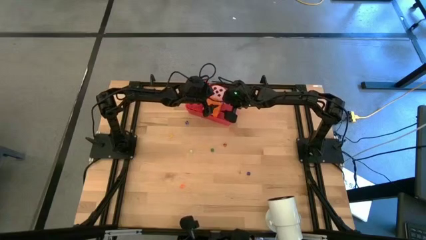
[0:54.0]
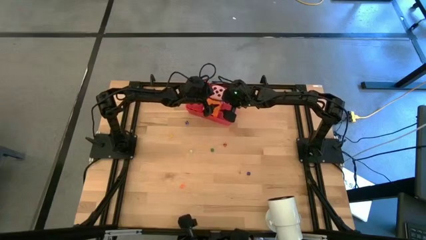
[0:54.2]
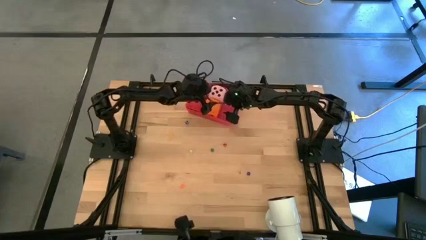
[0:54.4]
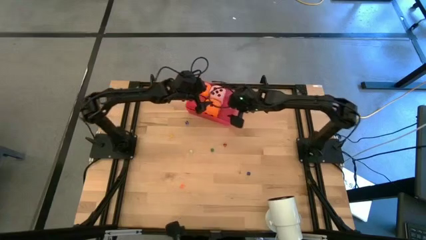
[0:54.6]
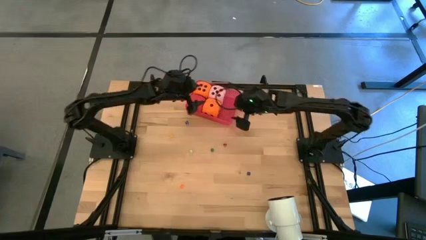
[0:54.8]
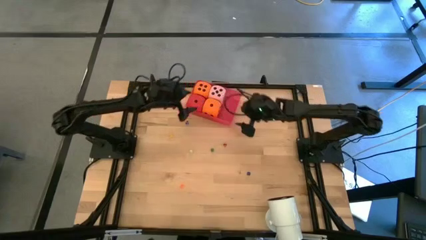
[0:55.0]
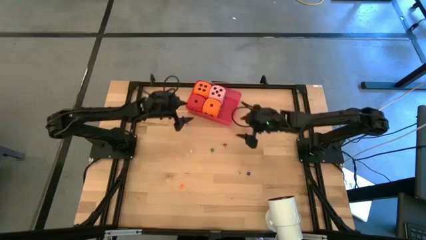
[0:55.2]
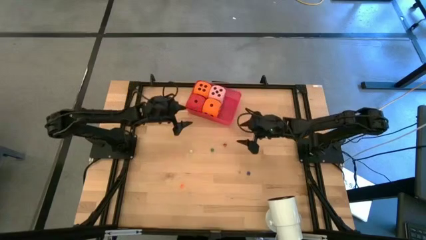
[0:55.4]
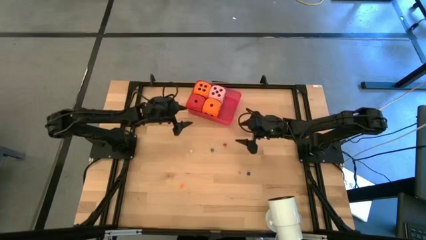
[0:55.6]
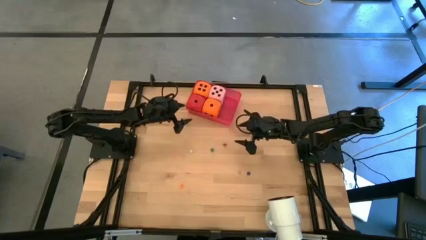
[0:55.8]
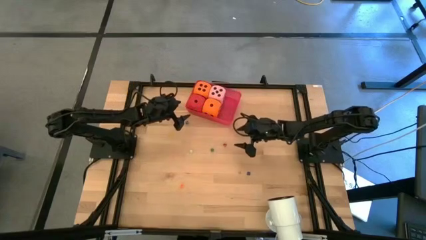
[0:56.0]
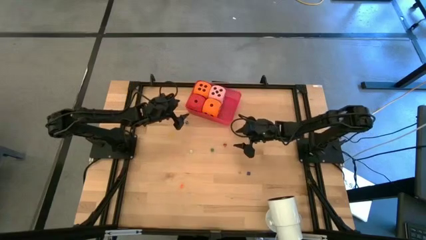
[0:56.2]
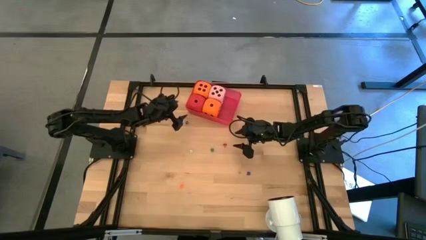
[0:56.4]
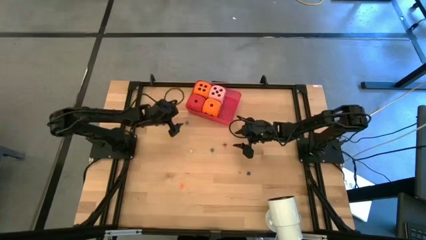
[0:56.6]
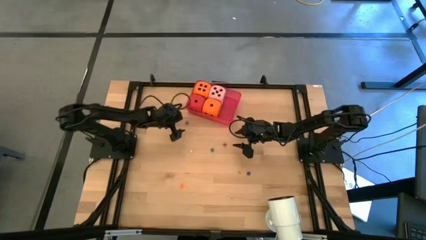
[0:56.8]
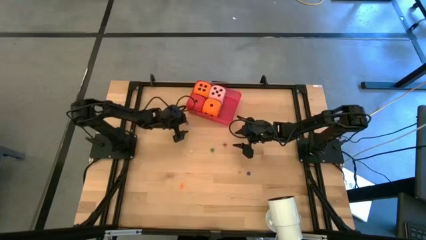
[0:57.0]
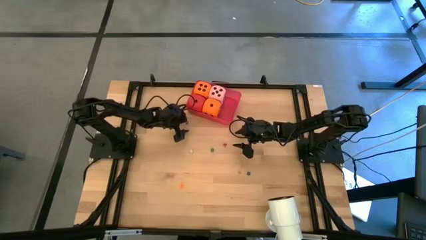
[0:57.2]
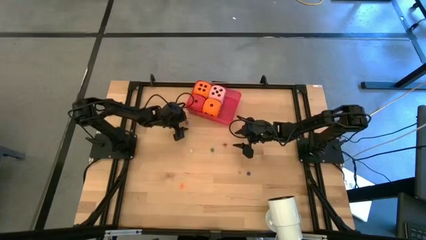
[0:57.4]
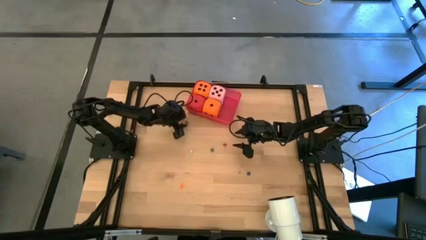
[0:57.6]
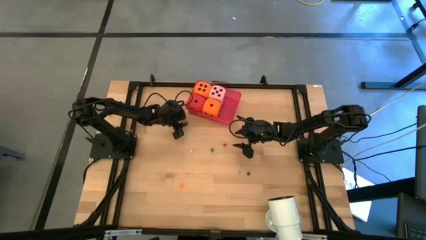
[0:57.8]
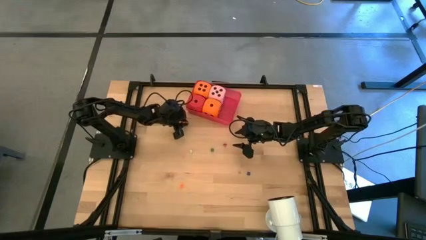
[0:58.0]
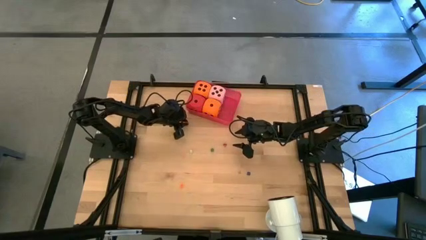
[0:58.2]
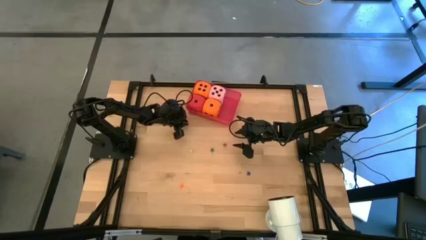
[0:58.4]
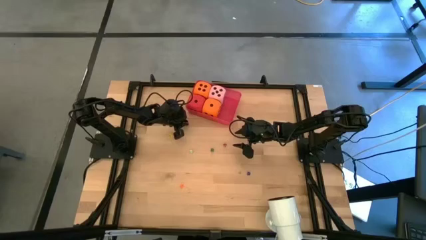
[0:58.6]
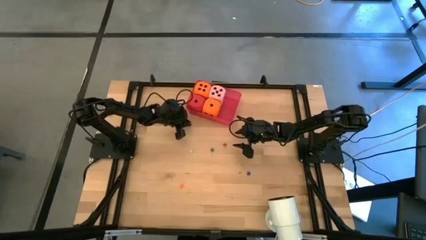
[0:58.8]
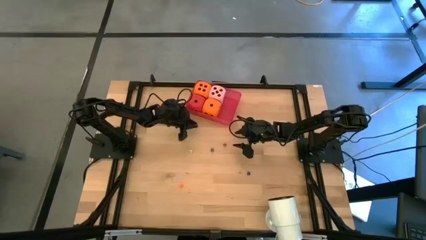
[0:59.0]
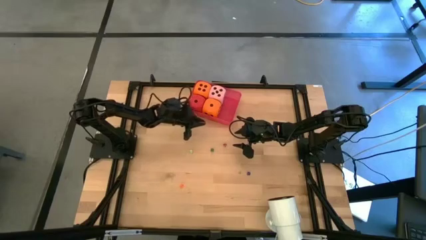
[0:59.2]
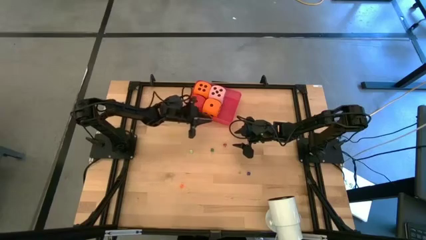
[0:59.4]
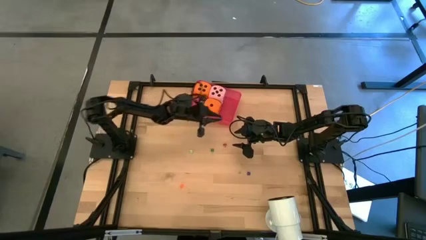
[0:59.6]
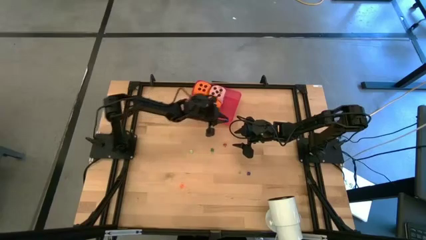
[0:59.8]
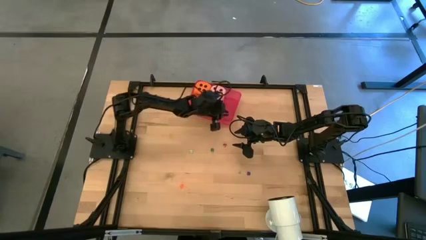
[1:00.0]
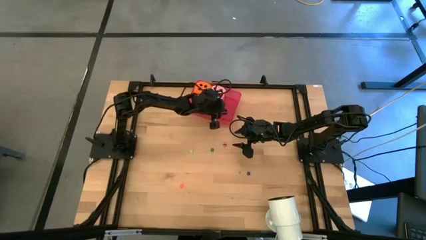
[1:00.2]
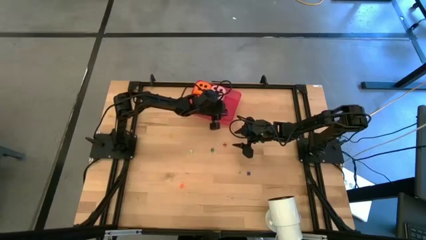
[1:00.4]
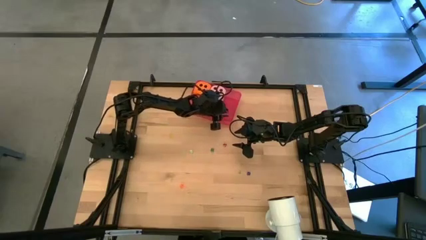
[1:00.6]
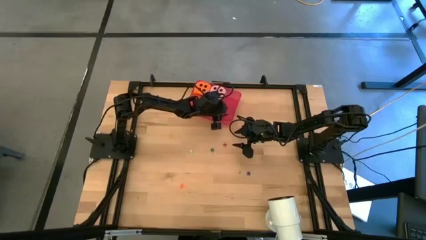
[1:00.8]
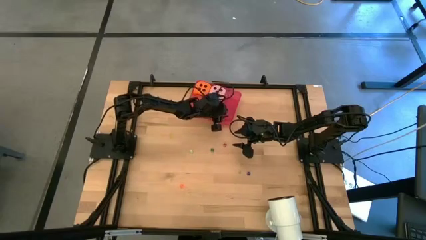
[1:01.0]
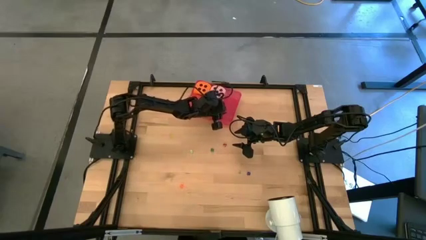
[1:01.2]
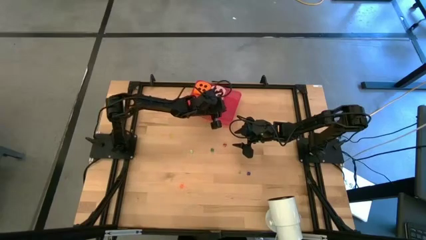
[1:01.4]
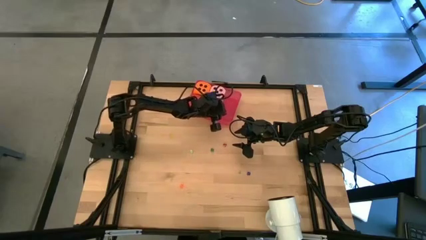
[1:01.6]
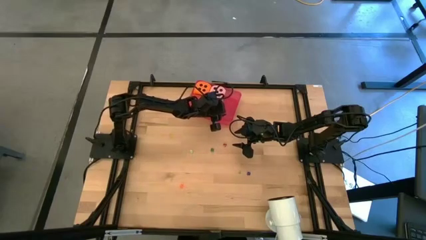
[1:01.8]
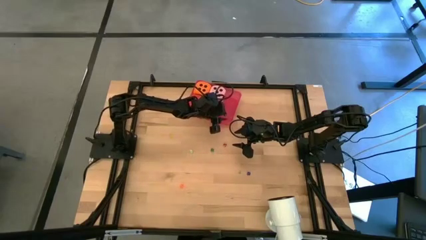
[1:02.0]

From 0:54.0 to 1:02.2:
Task: Pick & Place Dice
Put the top small blue die into the red bin

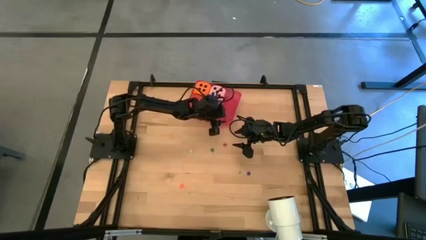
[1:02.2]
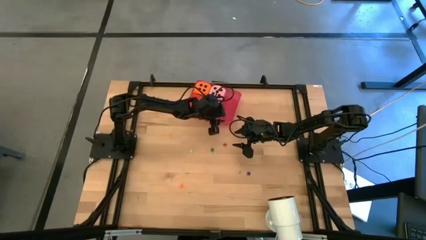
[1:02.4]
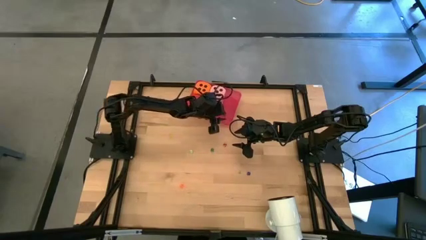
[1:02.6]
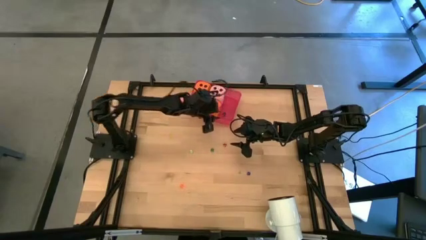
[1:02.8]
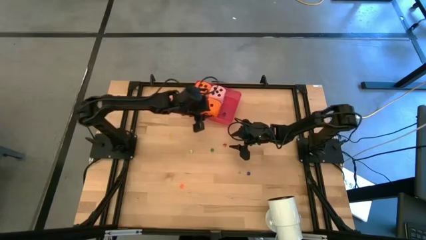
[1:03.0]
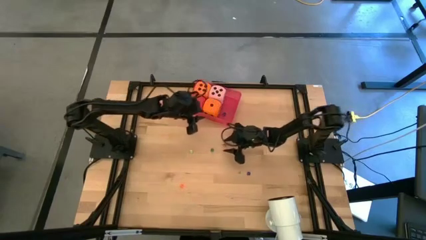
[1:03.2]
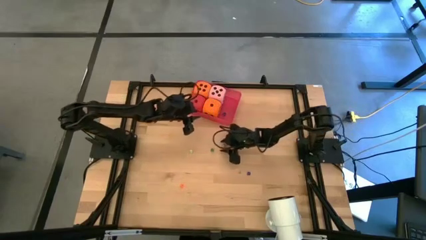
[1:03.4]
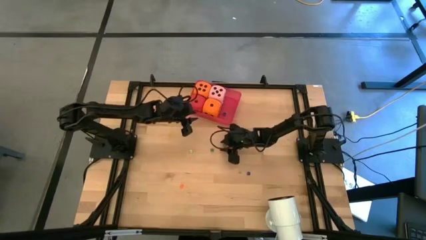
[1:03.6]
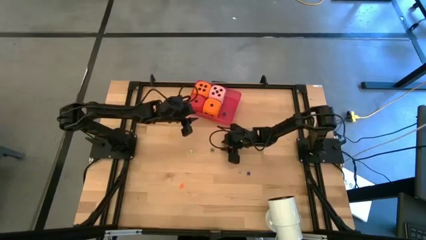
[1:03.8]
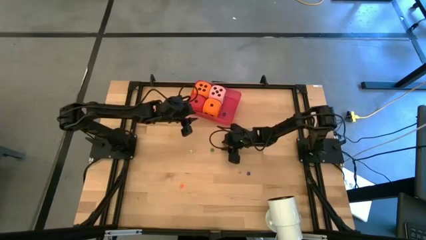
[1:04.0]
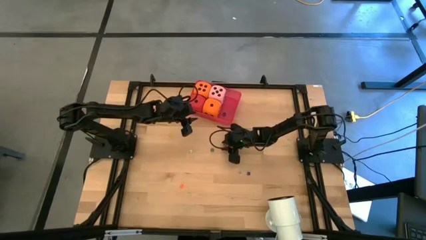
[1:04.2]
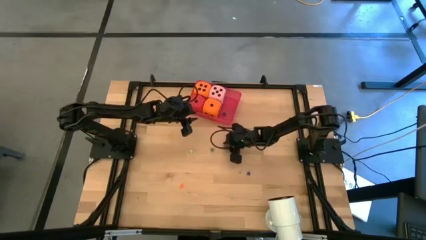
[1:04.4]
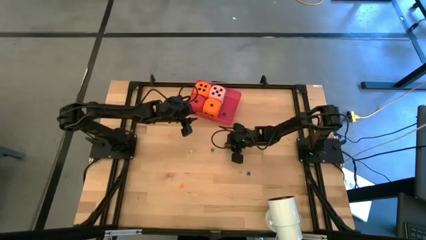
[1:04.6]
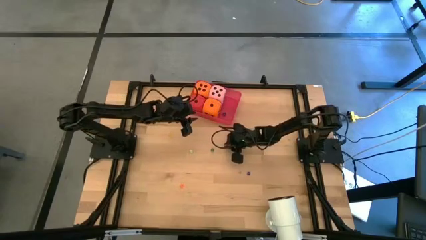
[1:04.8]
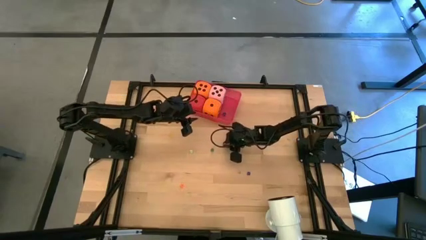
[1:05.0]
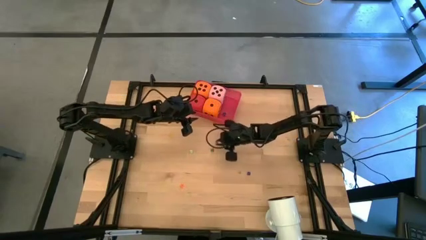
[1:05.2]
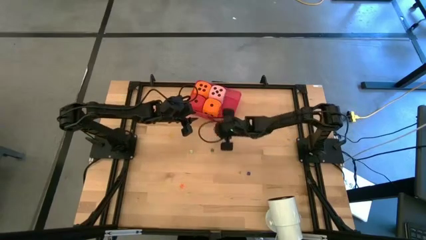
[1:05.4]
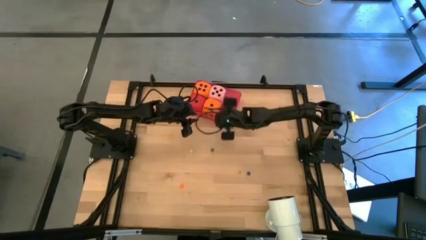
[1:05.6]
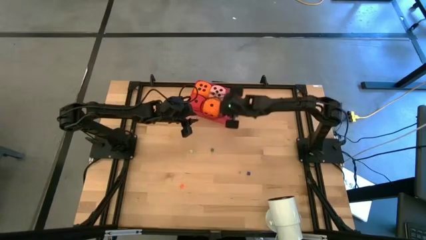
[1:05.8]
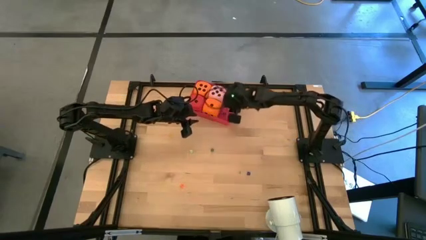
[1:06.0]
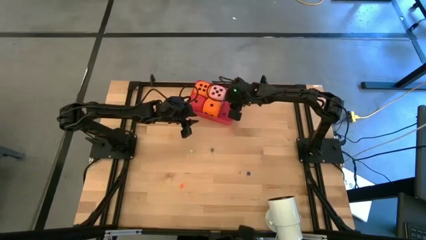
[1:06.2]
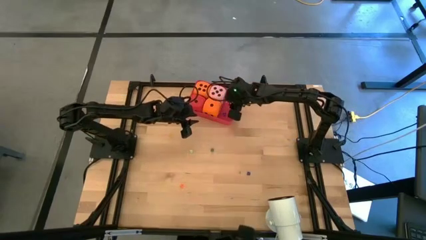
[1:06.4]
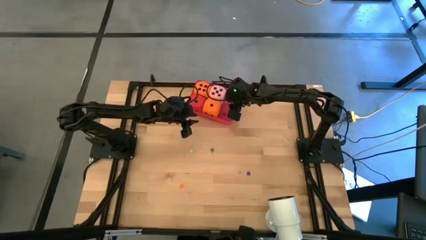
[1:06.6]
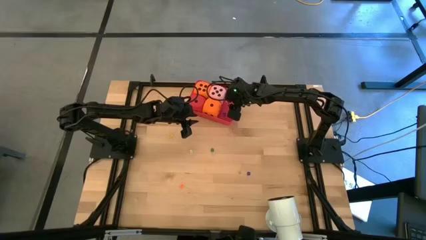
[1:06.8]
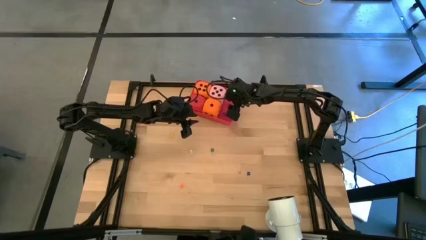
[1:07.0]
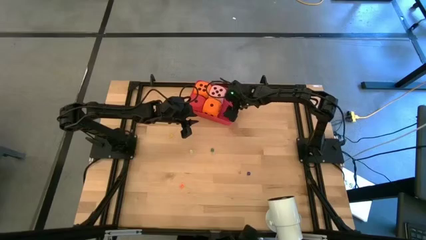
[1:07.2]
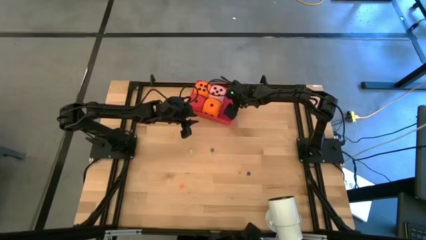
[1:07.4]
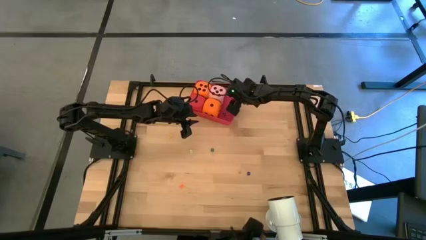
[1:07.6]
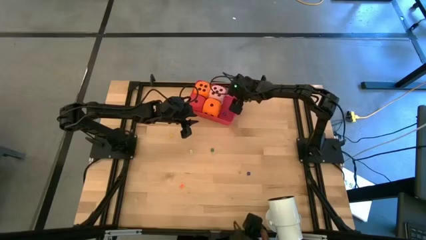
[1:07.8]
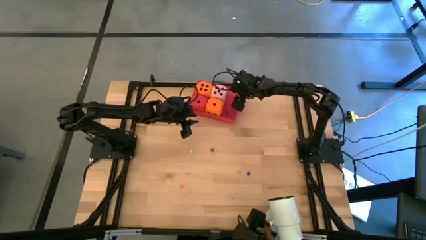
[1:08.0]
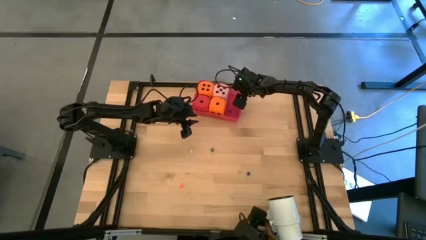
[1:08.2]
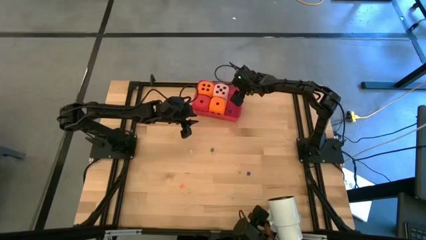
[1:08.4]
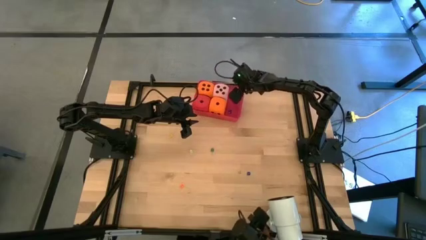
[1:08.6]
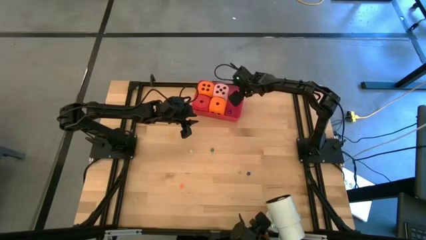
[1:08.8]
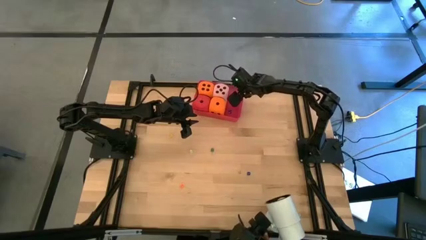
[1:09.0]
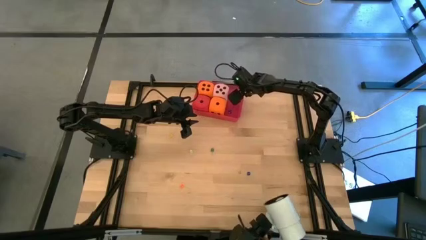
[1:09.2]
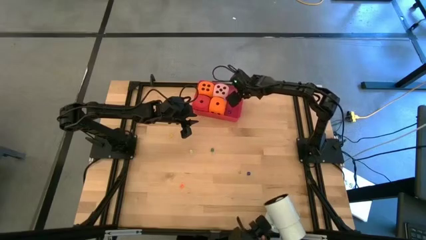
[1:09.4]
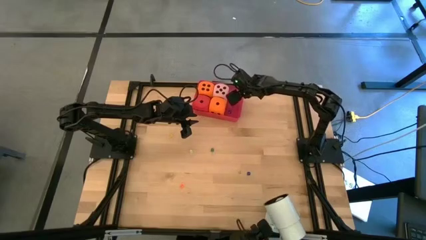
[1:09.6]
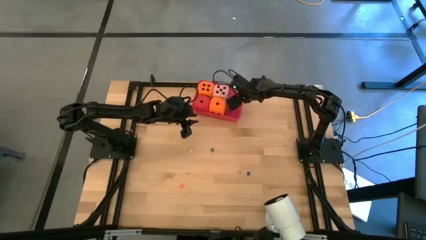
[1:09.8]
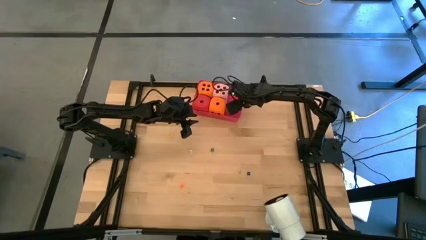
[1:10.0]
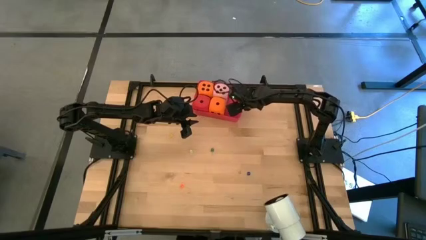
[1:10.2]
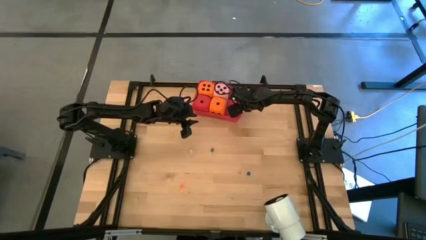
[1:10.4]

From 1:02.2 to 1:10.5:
Put the small red die into the red bin
